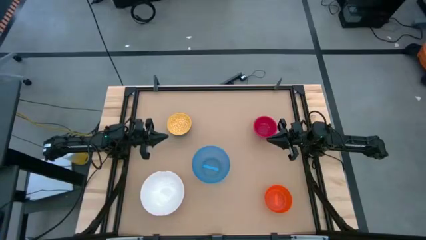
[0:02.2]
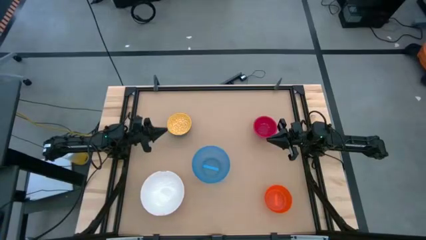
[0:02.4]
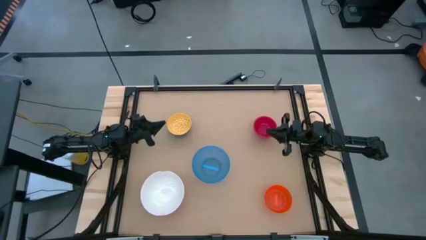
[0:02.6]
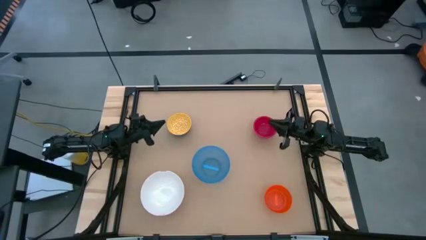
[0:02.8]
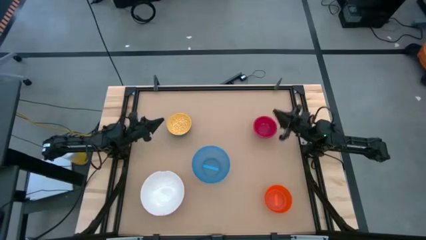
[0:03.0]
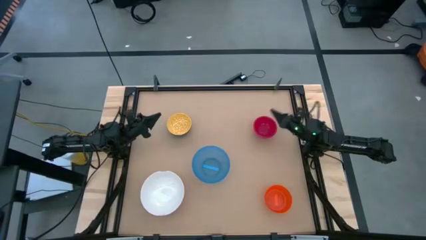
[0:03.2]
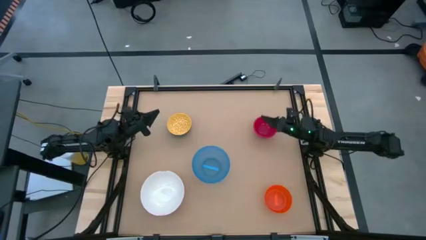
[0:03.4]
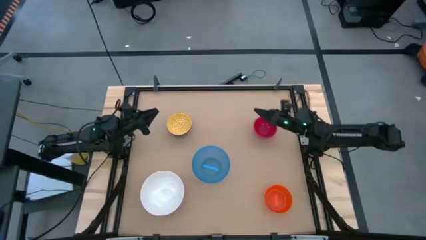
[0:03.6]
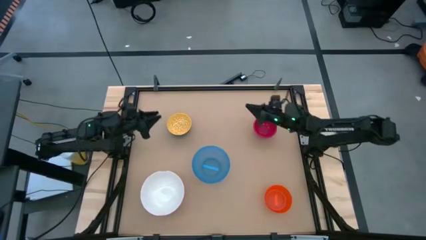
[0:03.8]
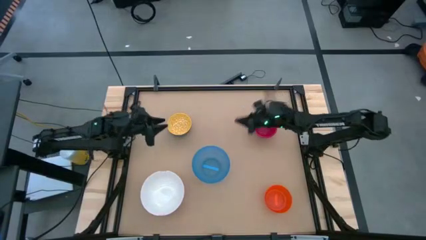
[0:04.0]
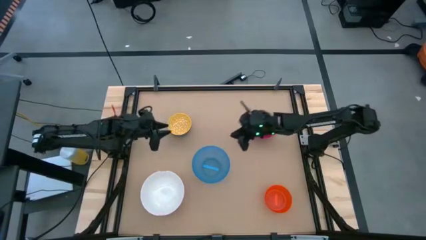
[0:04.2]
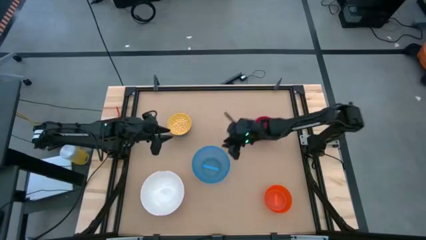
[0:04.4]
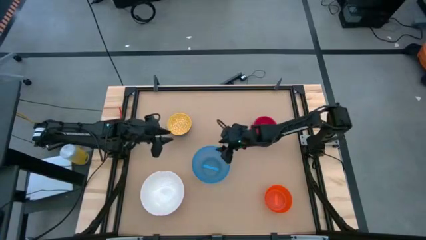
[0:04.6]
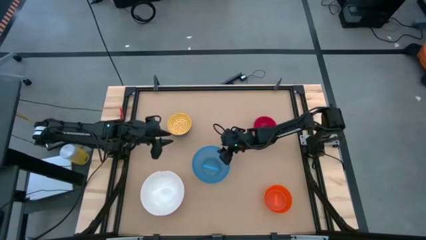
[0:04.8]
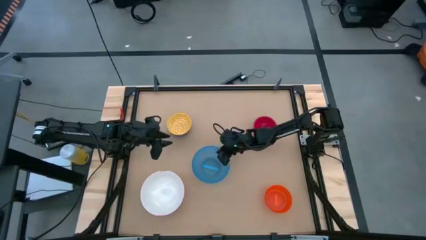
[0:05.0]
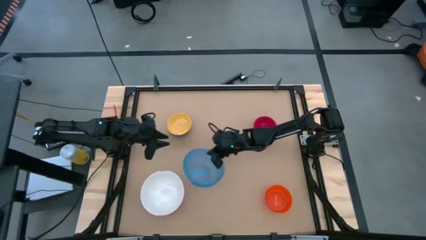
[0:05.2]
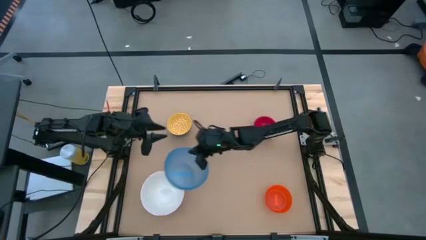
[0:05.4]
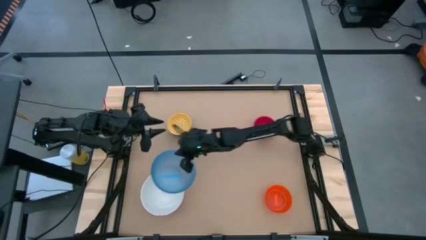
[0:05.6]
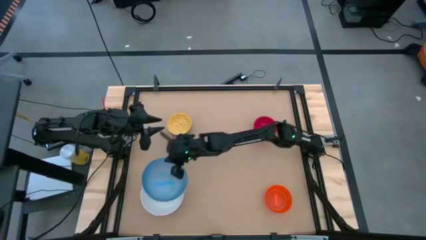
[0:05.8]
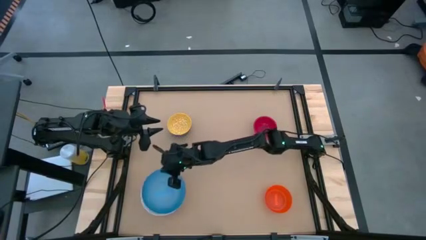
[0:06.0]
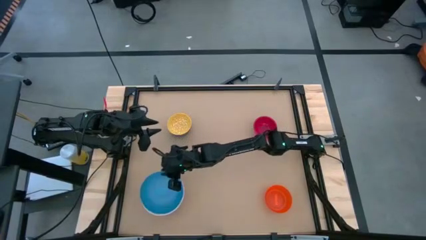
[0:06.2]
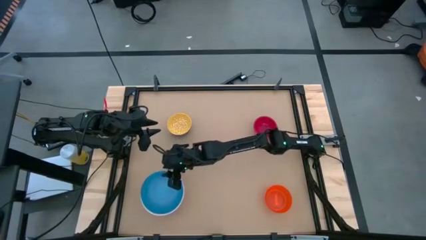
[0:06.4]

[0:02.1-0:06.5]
Stack the blue bowl on top of the white bowl

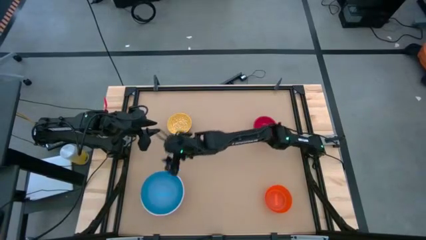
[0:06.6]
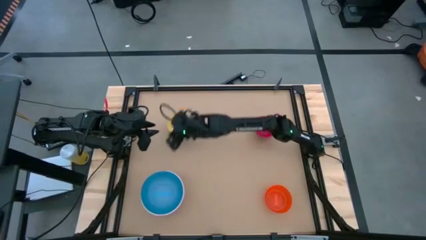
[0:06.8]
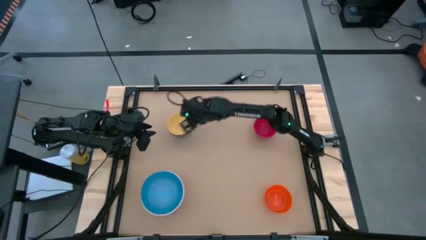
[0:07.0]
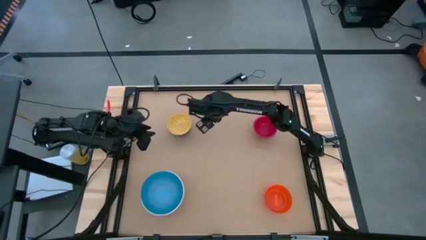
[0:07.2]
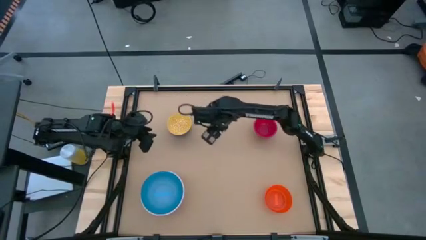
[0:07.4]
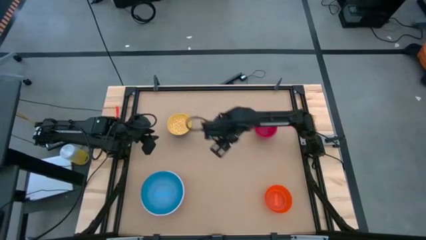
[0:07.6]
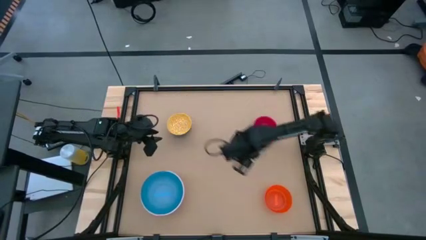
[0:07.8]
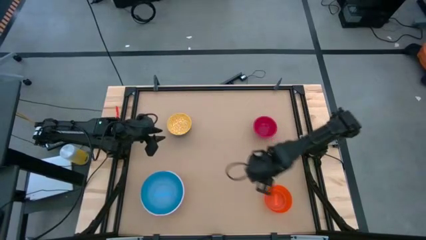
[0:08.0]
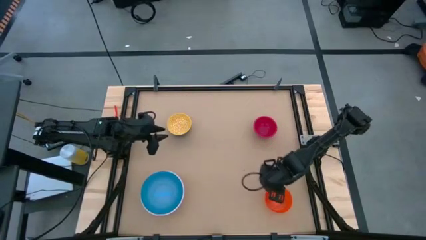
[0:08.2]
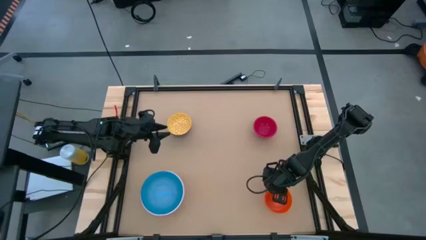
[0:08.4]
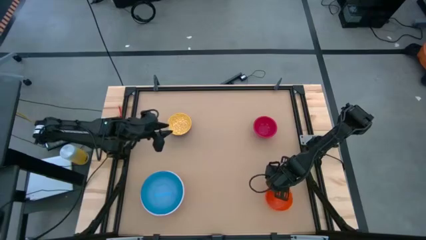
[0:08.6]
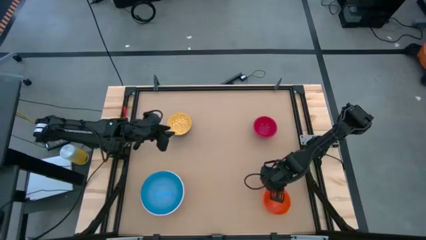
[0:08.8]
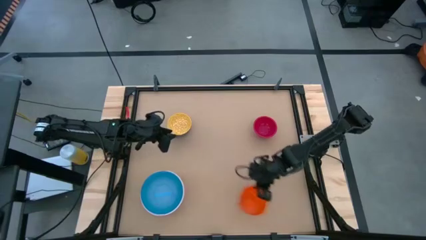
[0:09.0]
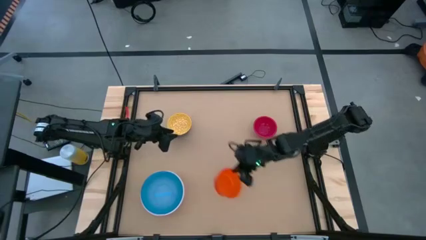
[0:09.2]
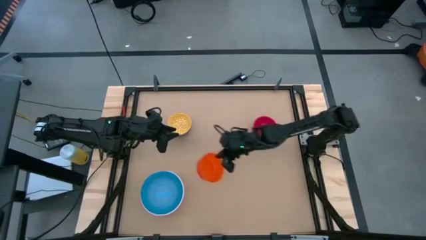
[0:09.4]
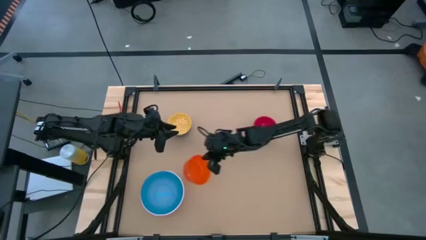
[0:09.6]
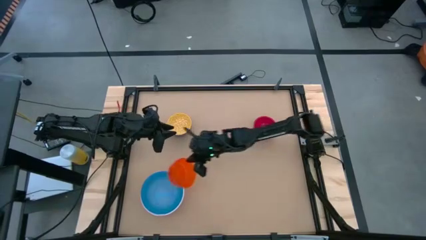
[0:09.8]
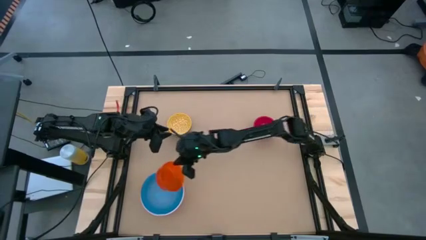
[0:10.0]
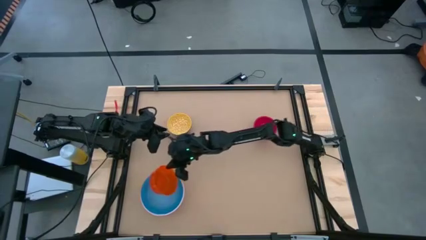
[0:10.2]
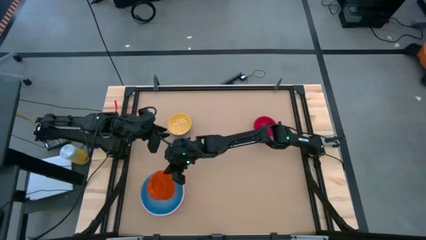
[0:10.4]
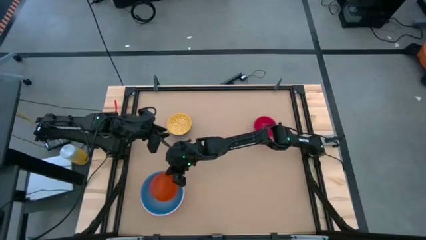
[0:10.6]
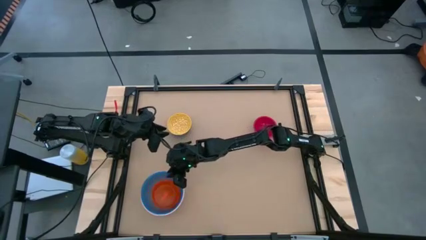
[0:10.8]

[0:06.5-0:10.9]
Stack the orange bowl on top of the blue bowl

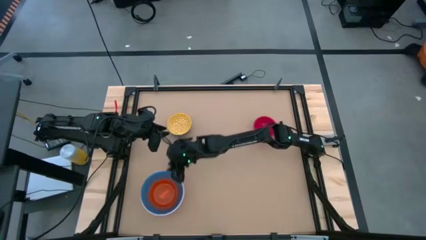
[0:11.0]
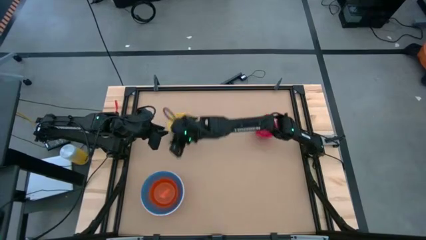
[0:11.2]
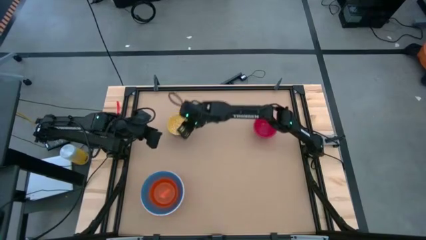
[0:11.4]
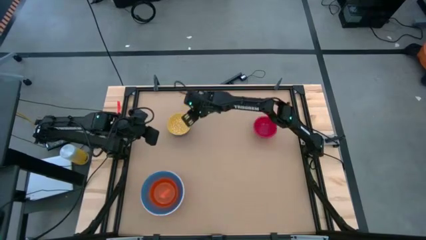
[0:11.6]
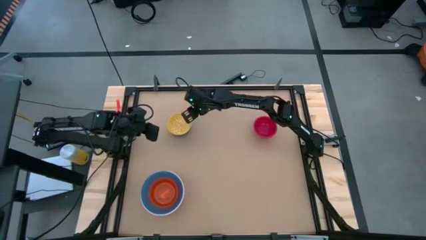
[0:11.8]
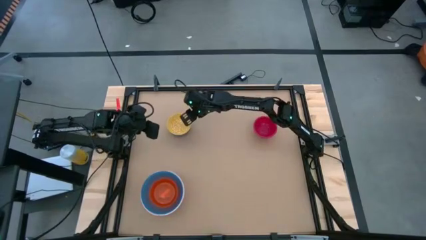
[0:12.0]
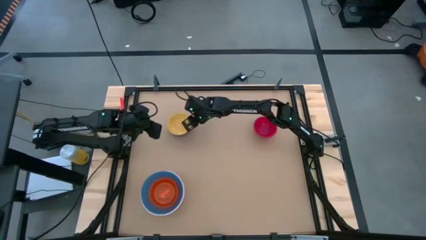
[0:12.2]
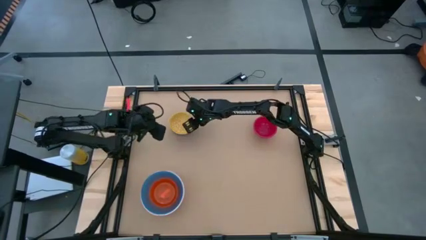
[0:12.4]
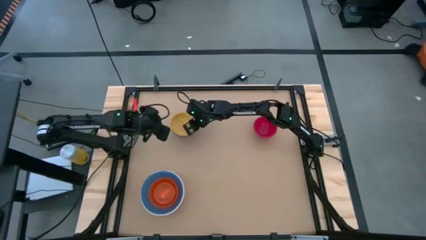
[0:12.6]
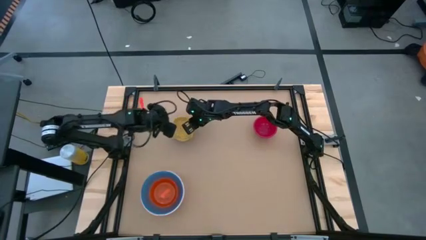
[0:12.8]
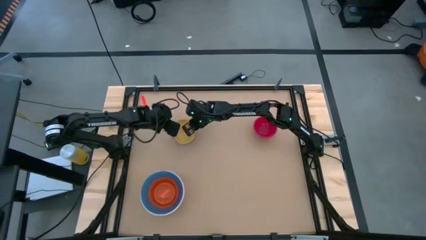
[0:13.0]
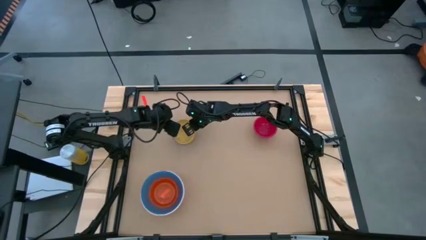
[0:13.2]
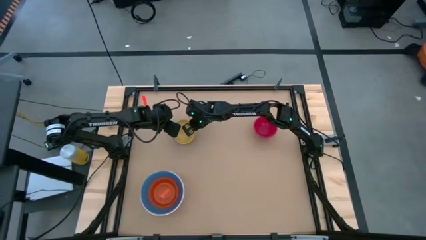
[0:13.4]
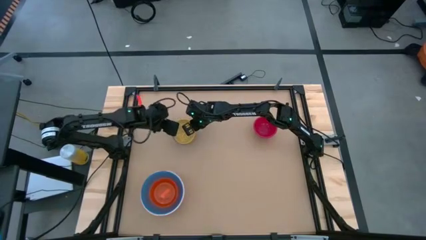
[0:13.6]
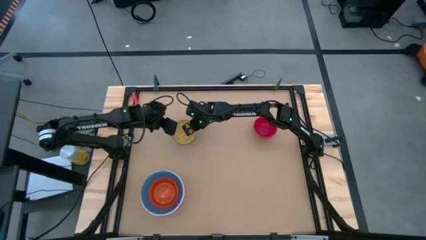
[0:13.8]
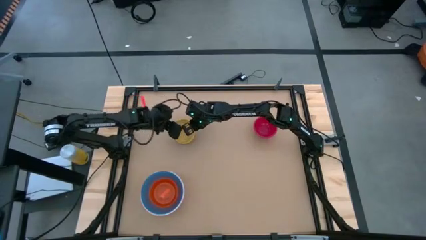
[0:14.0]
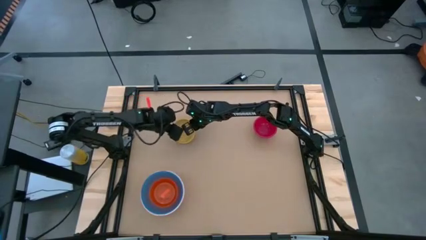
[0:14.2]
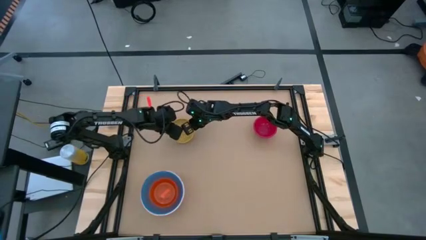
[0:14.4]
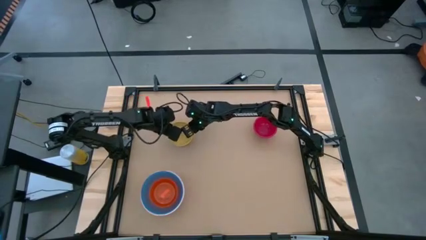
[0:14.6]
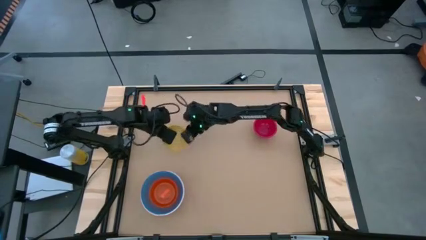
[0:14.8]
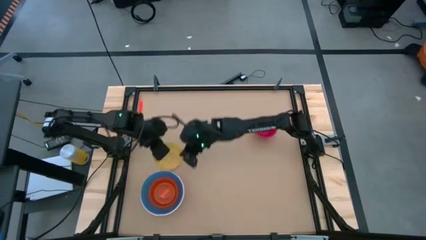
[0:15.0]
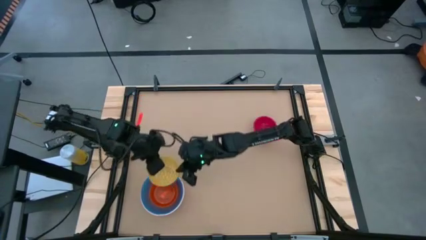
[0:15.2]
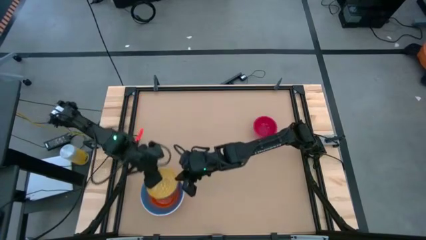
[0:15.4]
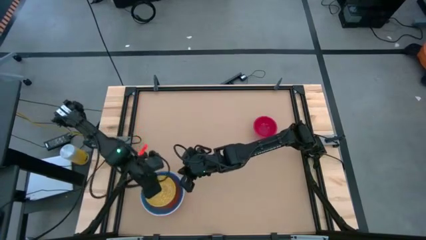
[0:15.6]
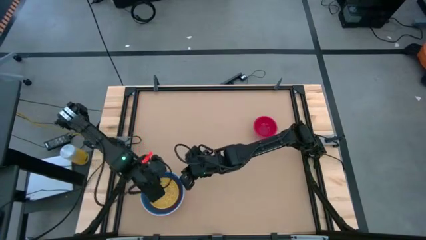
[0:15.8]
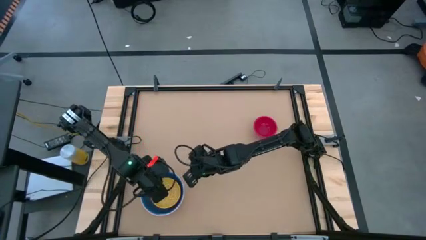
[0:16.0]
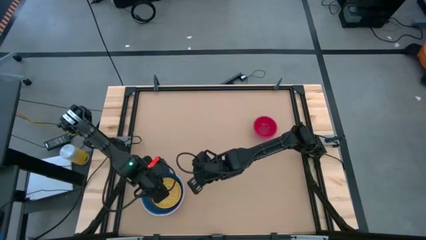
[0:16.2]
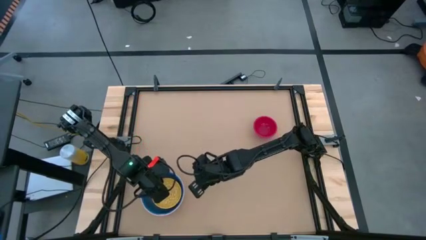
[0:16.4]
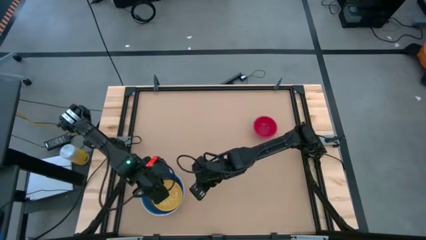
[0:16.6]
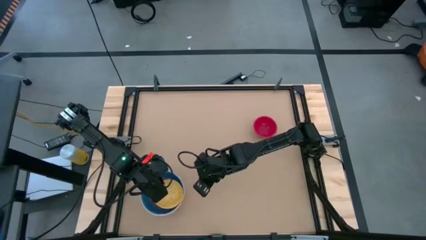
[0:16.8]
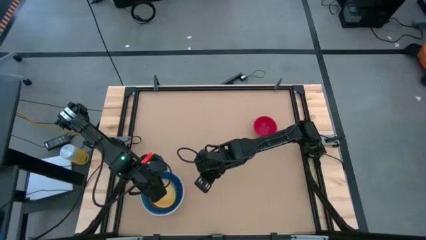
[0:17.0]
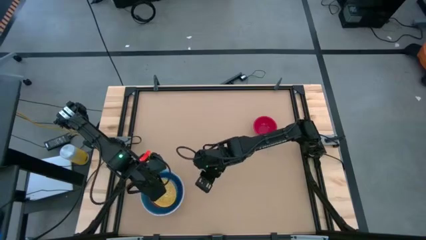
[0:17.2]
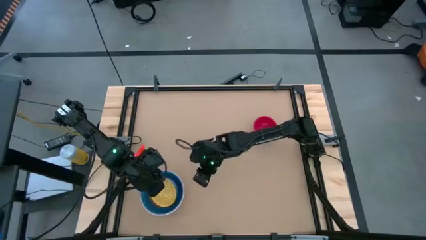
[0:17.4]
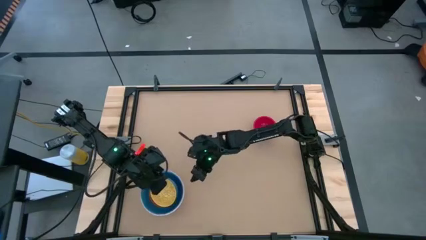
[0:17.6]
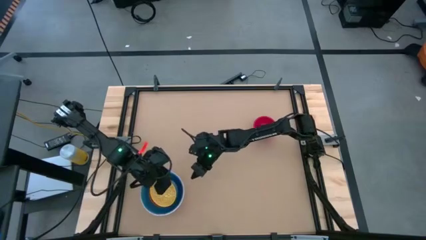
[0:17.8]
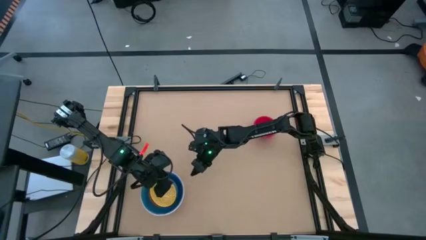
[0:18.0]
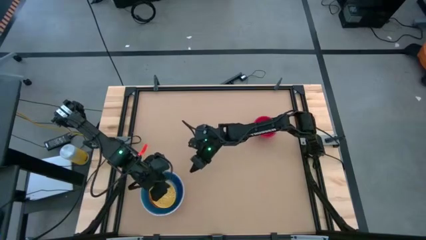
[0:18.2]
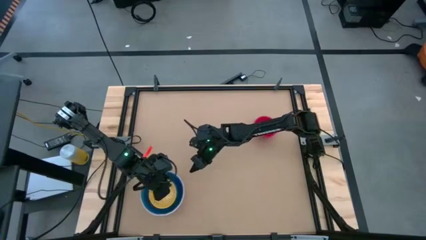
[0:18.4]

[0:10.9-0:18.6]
Stack the patterned blue bowl on top of the orange bowl
